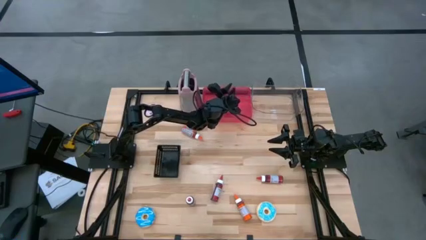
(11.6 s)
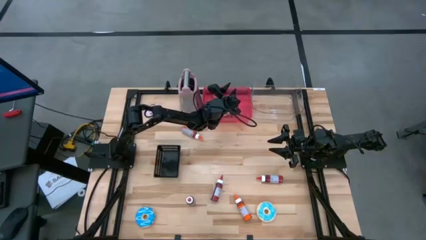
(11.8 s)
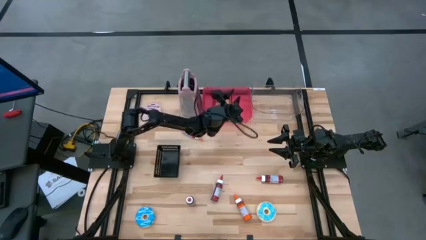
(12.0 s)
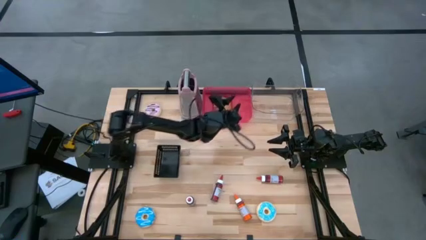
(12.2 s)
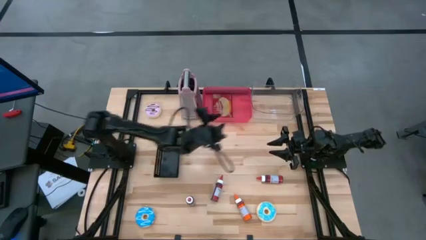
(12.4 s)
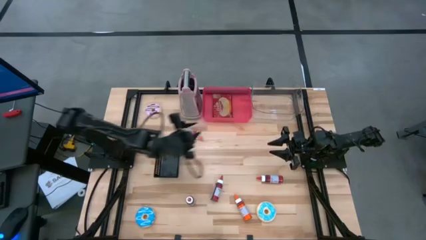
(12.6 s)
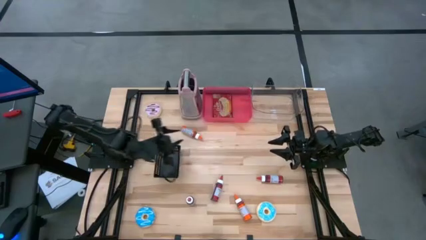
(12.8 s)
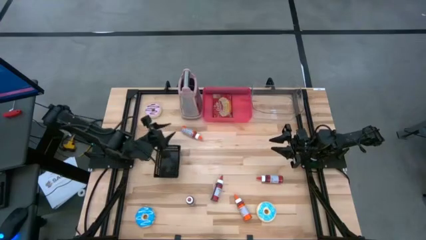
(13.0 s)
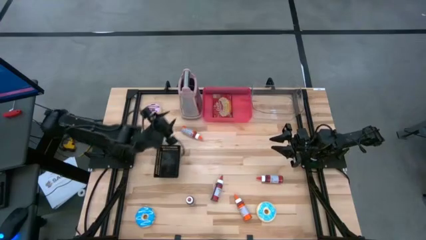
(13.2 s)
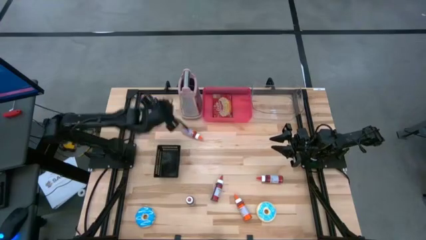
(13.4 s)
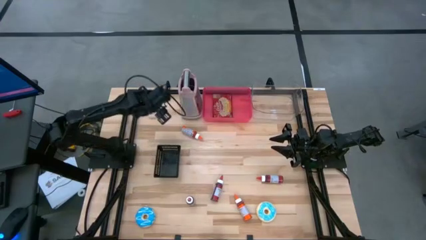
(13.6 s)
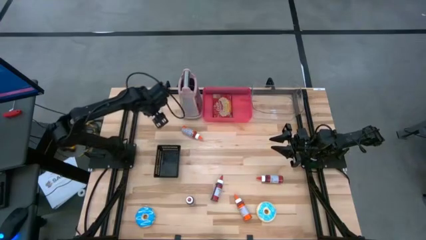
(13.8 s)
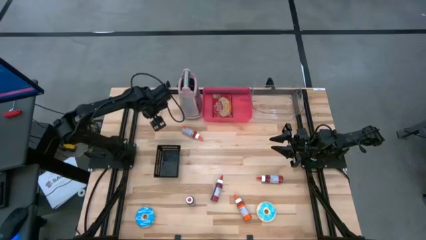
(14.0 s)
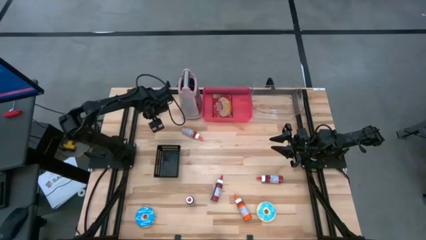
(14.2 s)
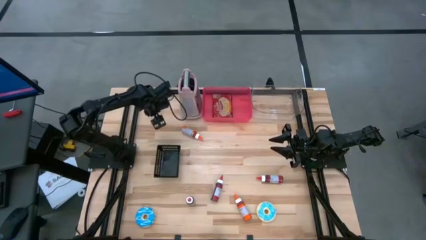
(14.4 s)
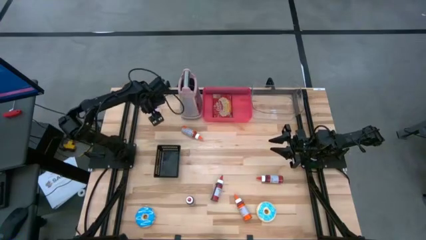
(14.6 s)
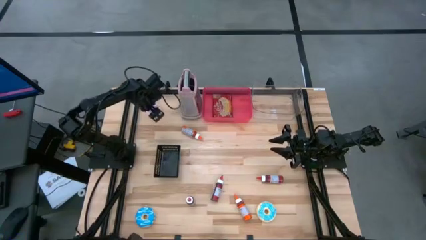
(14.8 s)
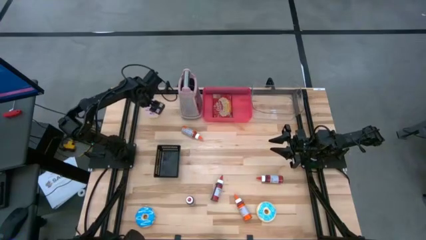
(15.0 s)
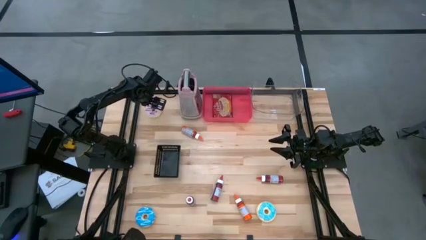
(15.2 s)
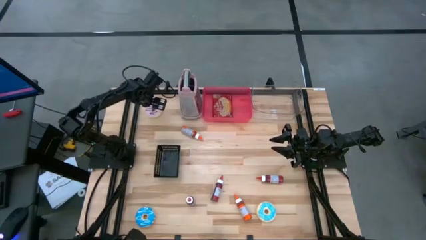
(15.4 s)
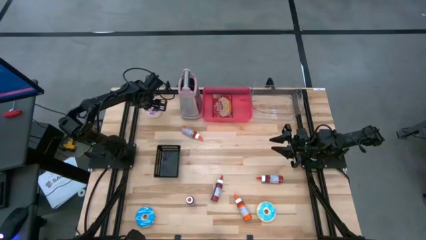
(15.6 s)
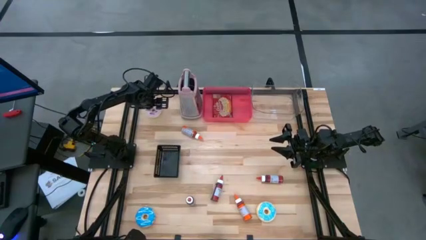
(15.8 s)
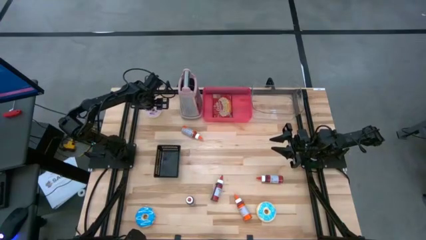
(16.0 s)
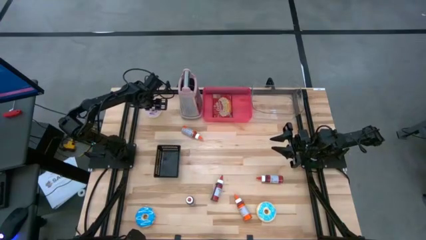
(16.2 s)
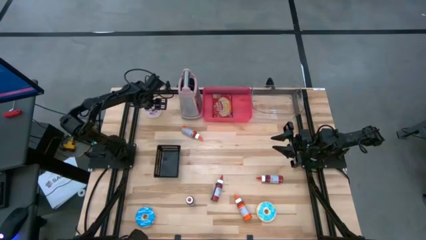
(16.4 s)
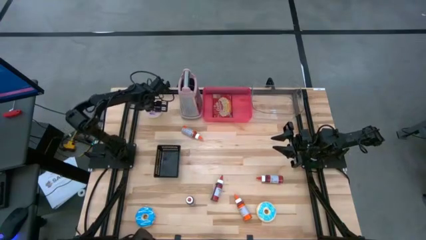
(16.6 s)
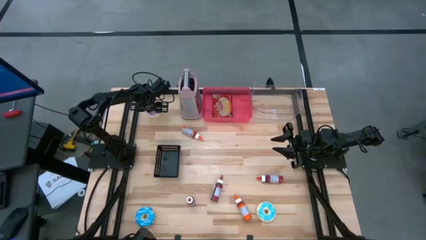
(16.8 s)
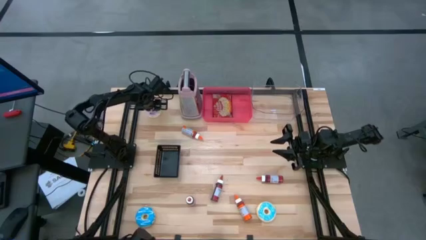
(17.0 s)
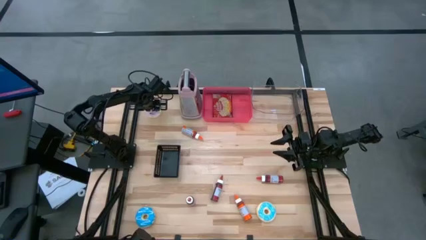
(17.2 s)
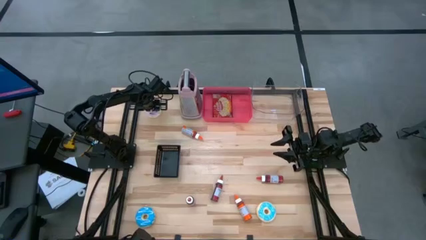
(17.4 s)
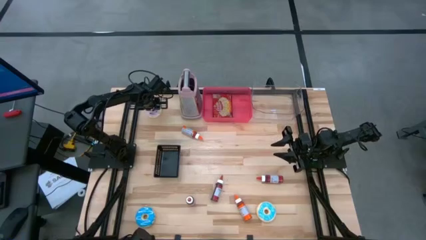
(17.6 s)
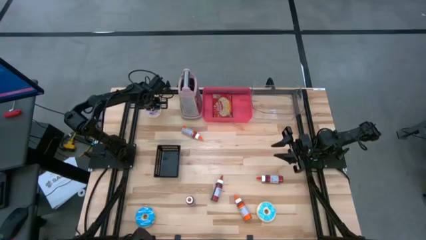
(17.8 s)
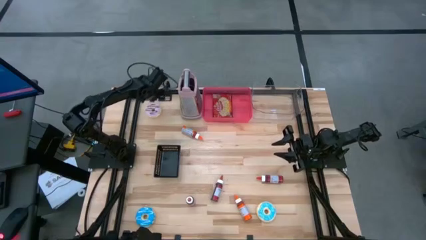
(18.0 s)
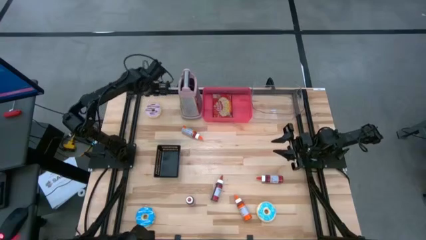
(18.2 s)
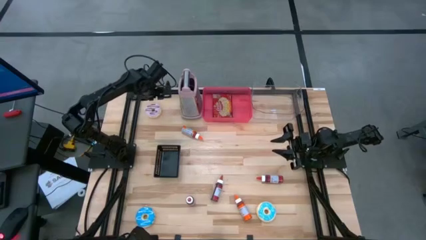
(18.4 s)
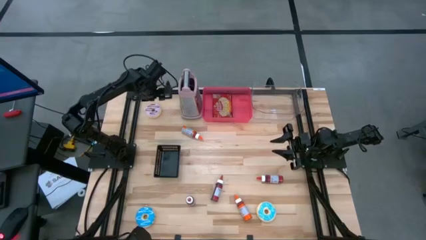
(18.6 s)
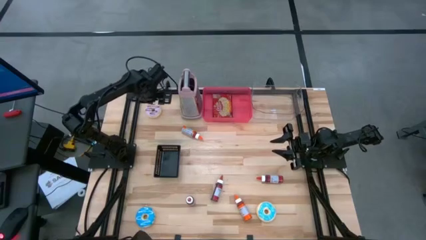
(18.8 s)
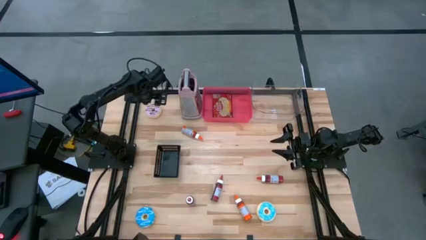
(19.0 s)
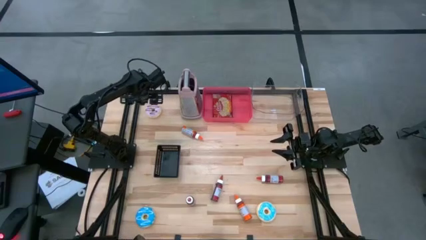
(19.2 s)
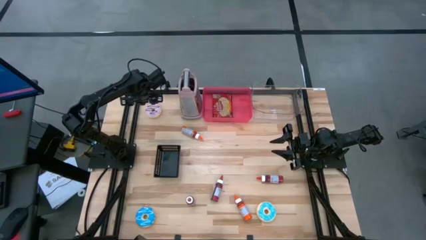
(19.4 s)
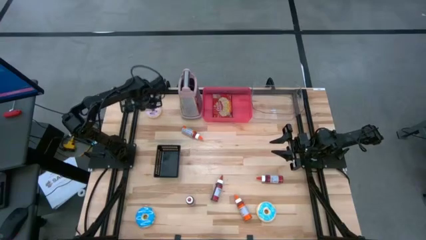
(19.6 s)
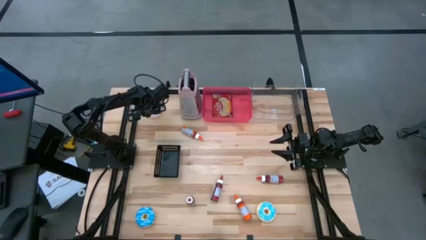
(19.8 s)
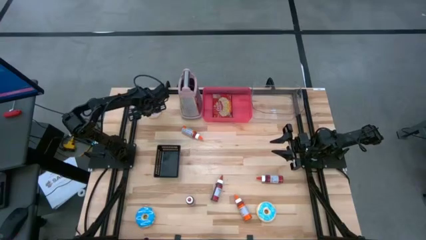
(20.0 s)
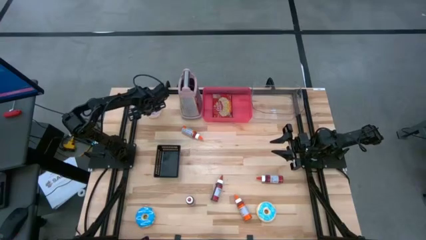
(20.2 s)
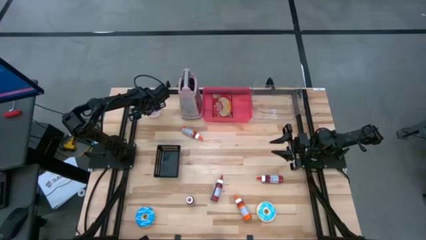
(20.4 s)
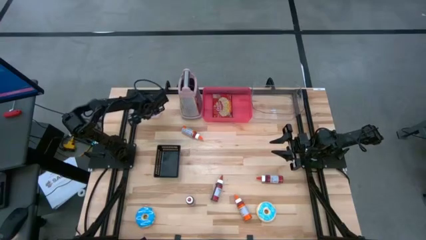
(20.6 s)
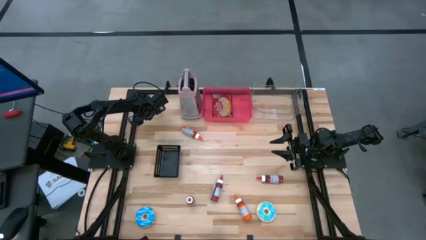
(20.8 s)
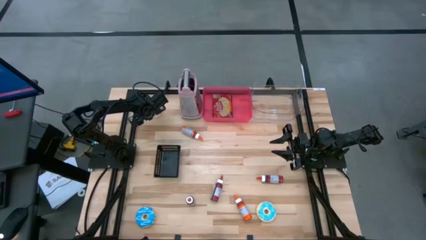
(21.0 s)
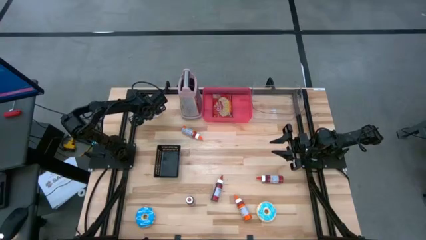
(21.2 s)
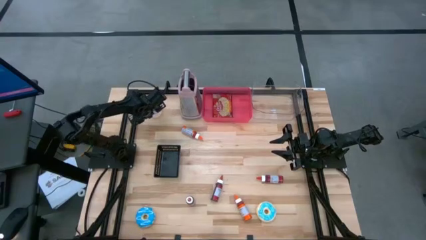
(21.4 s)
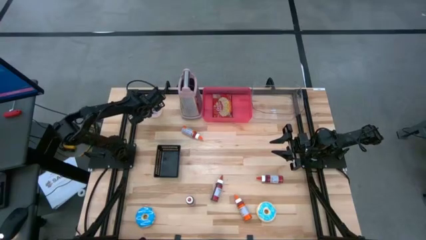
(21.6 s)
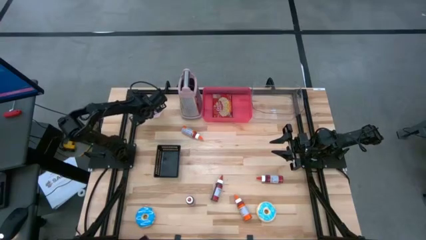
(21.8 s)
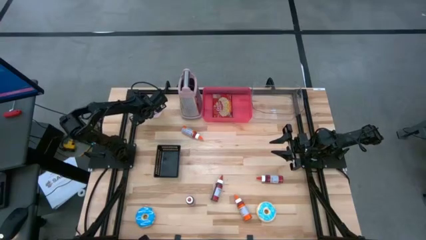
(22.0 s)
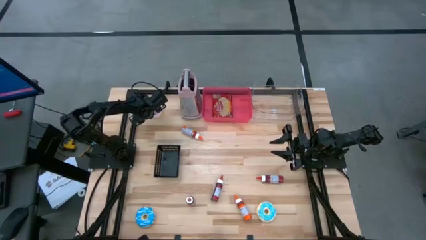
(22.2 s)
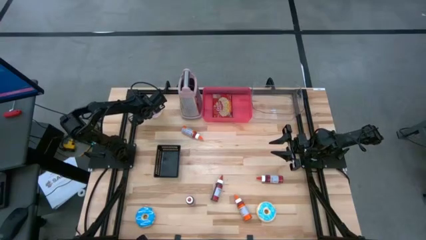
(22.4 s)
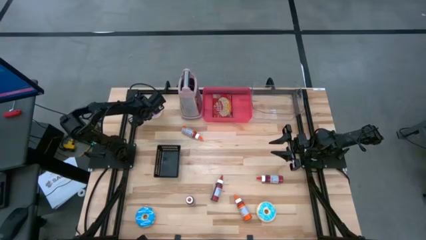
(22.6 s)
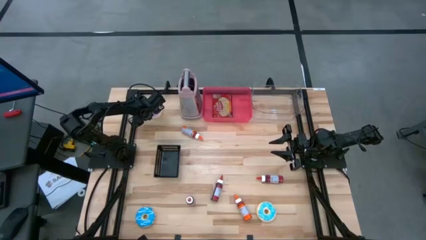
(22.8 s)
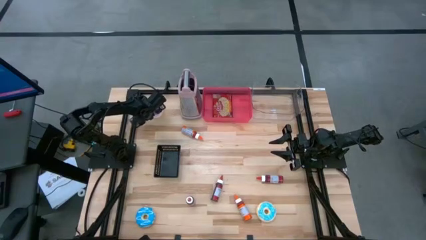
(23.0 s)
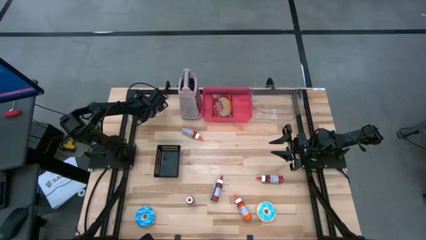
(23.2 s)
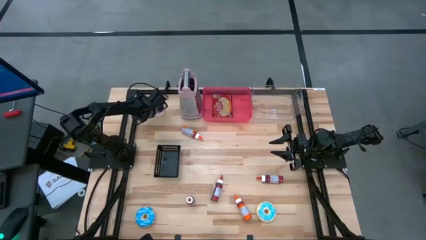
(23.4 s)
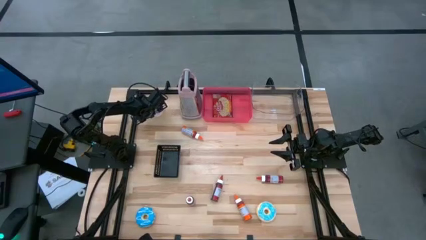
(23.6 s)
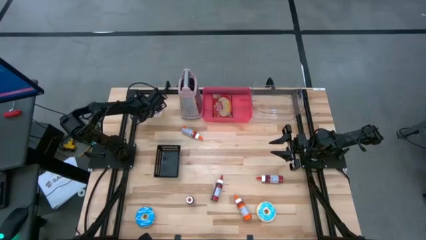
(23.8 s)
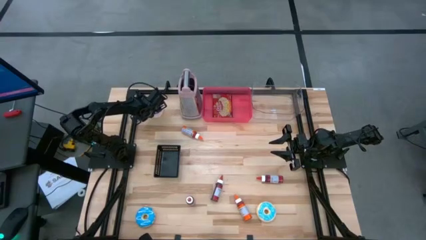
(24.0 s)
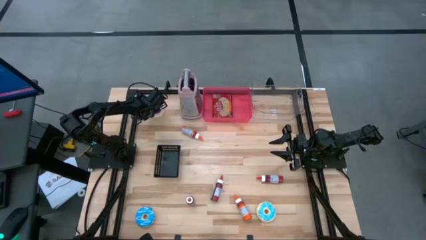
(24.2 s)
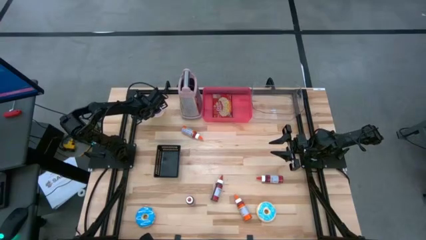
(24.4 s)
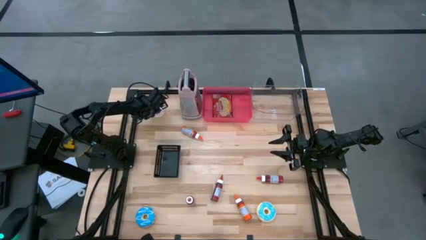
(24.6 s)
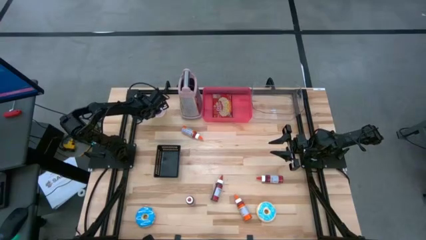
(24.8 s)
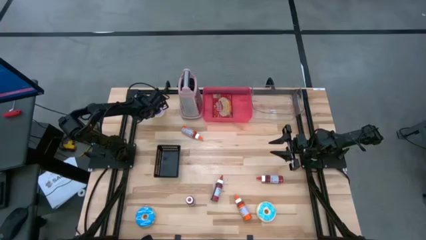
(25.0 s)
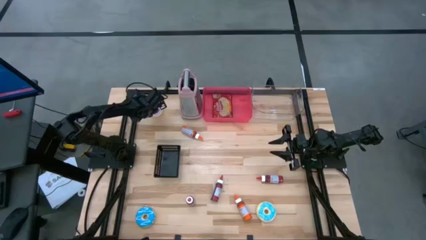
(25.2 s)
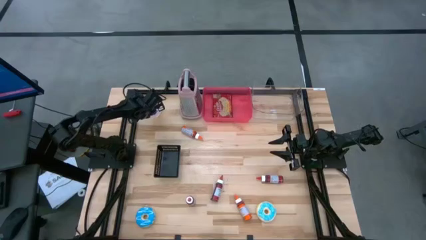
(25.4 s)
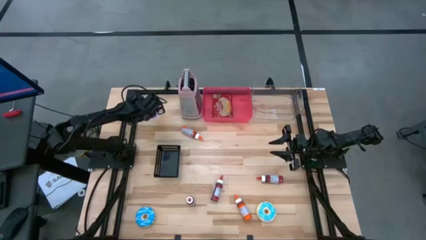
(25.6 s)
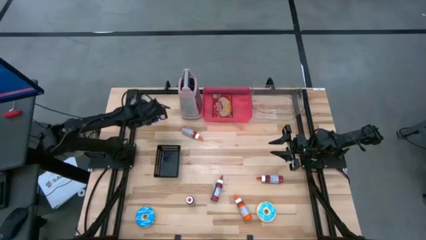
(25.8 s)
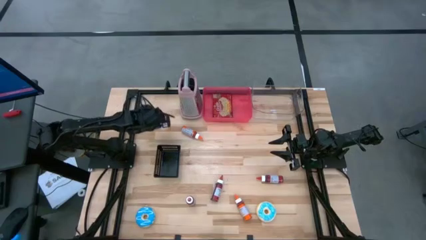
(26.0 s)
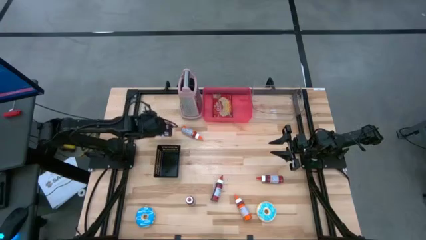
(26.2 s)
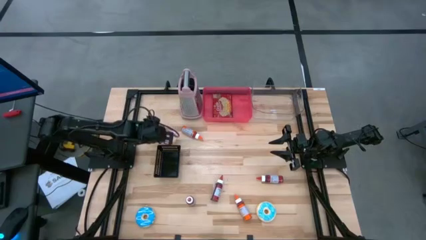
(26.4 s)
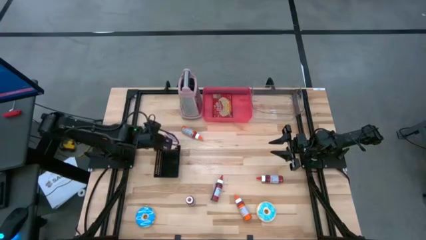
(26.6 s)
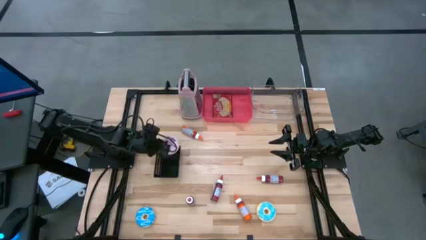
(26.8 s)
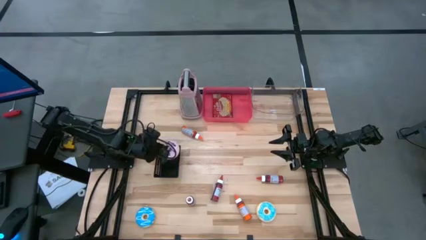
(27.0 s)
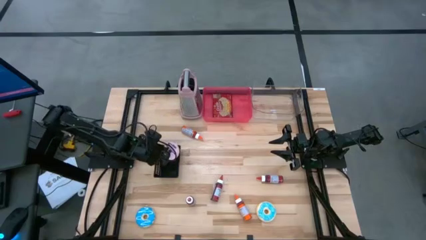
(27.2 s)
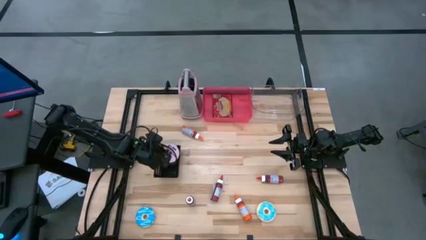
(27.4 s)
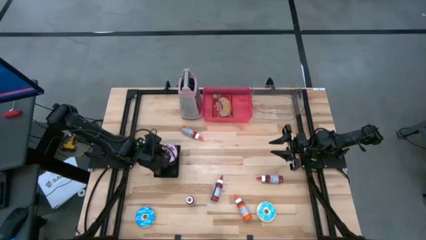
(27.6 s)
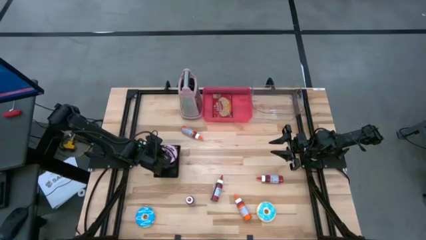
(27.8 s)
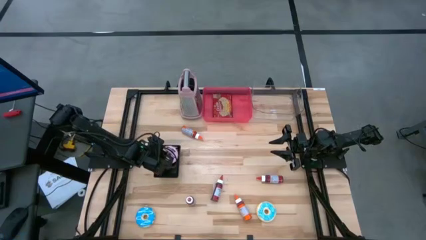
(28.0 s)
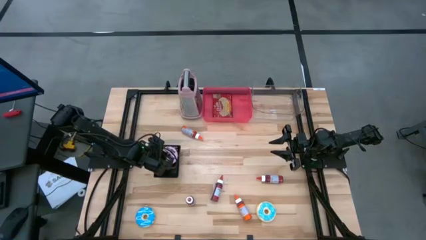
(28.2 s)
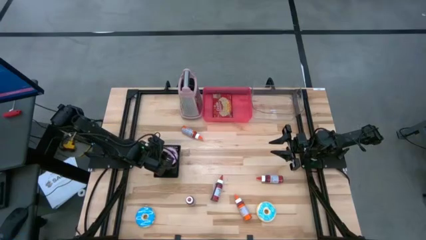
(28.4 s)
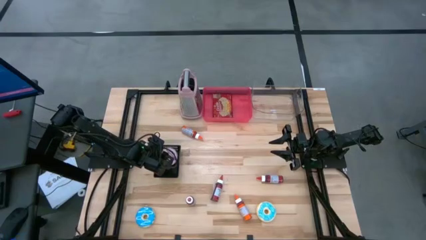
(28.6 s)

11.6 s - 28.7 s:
Put the purple donut into the black bin
